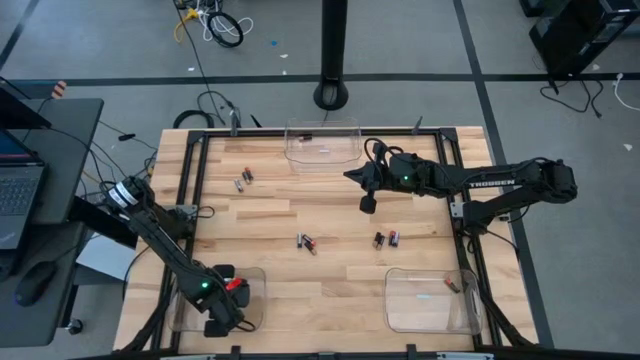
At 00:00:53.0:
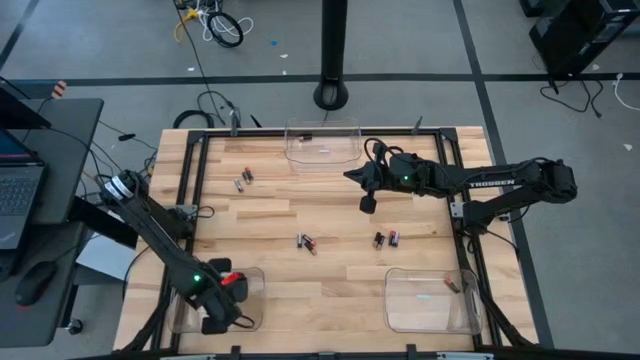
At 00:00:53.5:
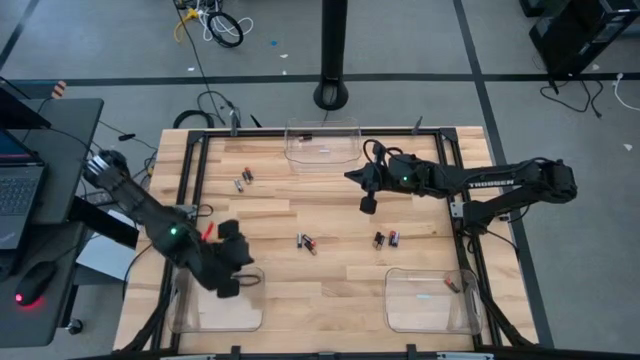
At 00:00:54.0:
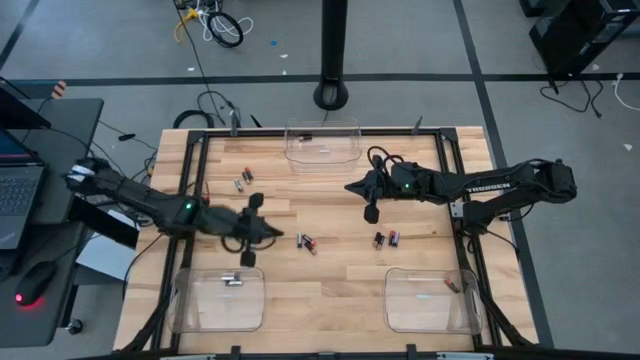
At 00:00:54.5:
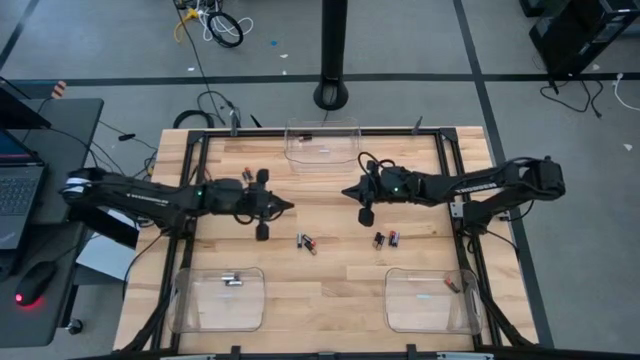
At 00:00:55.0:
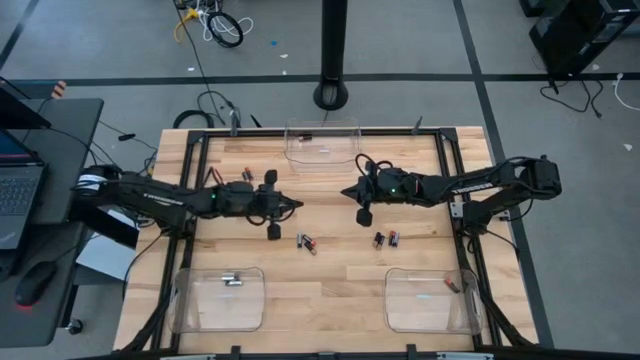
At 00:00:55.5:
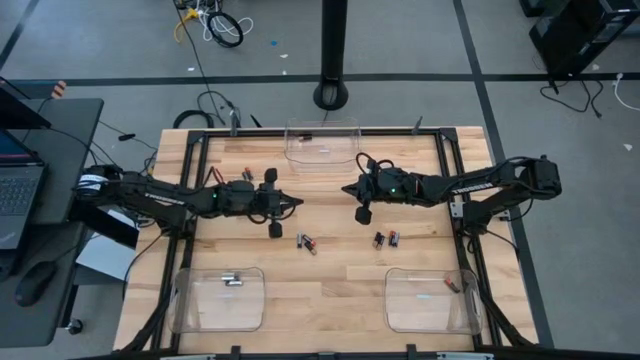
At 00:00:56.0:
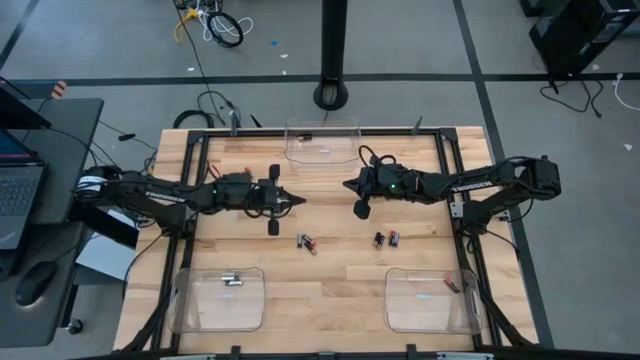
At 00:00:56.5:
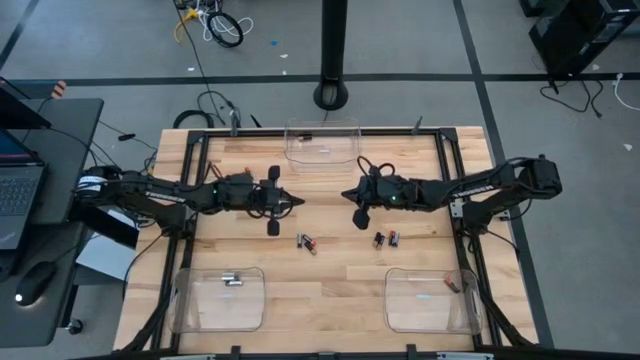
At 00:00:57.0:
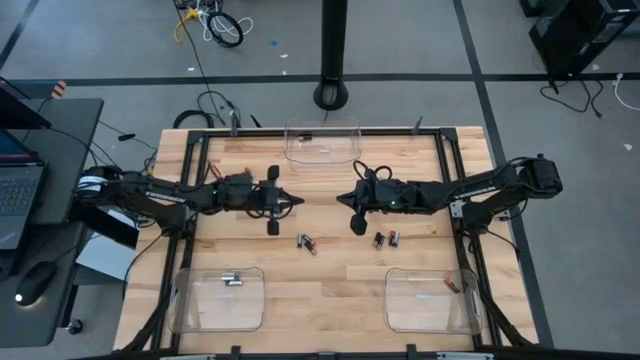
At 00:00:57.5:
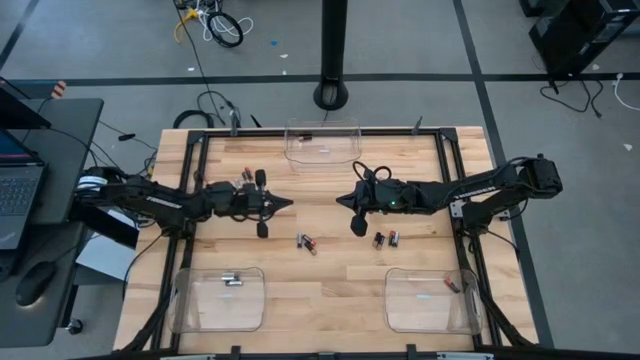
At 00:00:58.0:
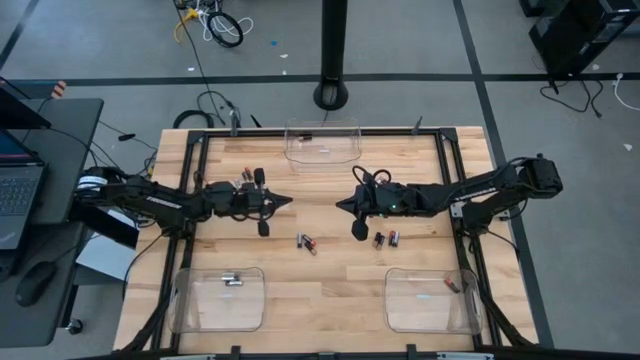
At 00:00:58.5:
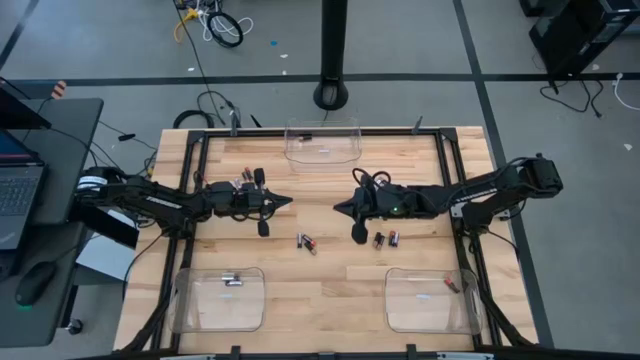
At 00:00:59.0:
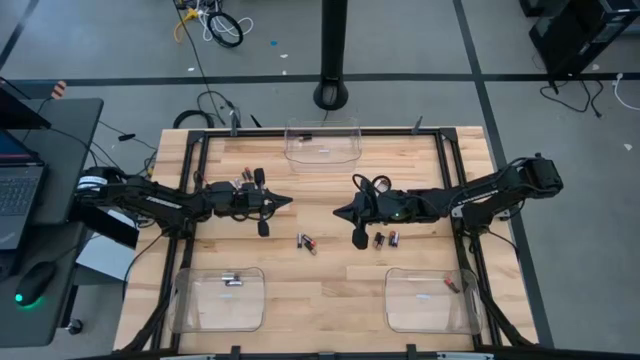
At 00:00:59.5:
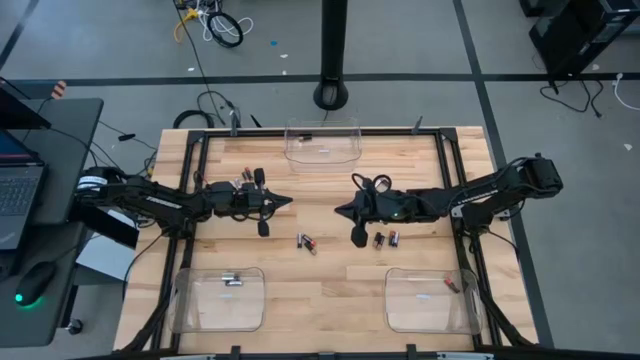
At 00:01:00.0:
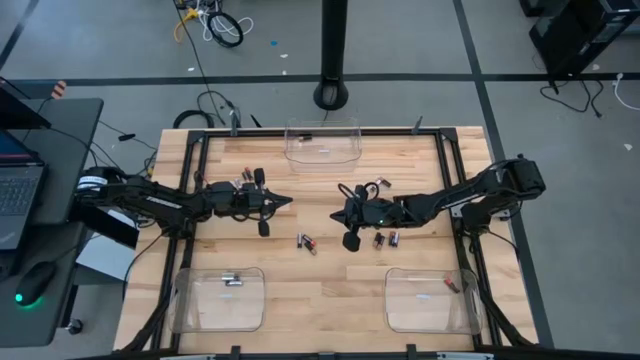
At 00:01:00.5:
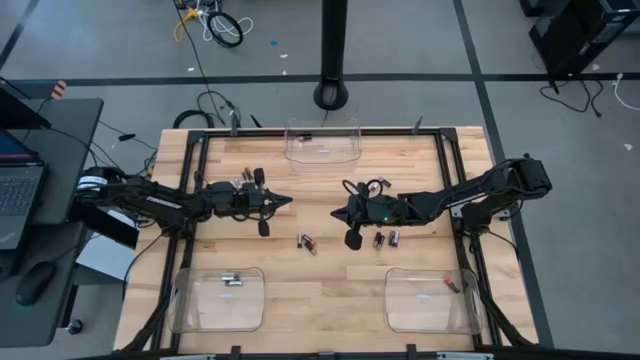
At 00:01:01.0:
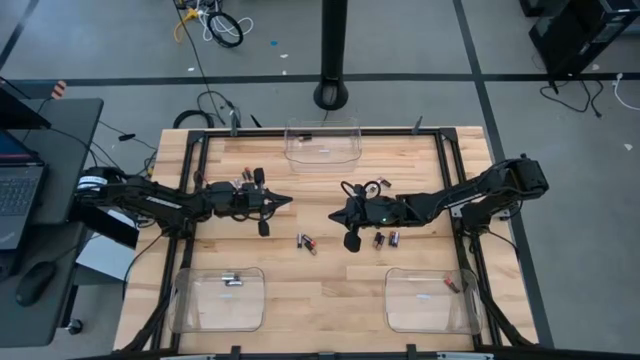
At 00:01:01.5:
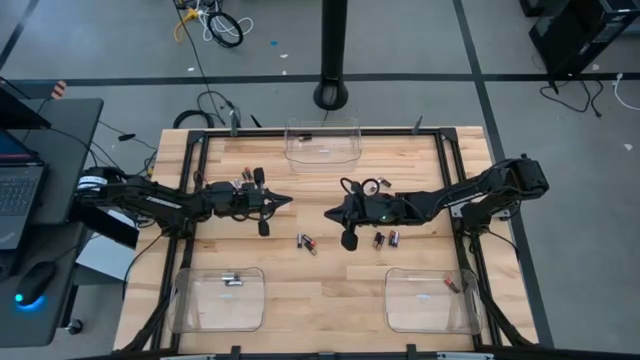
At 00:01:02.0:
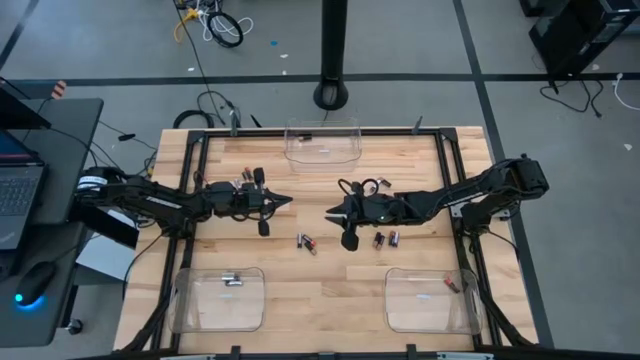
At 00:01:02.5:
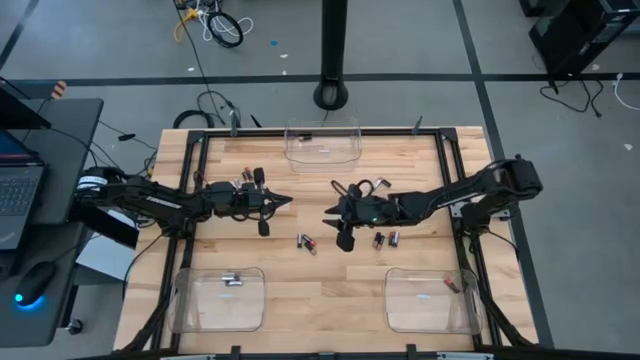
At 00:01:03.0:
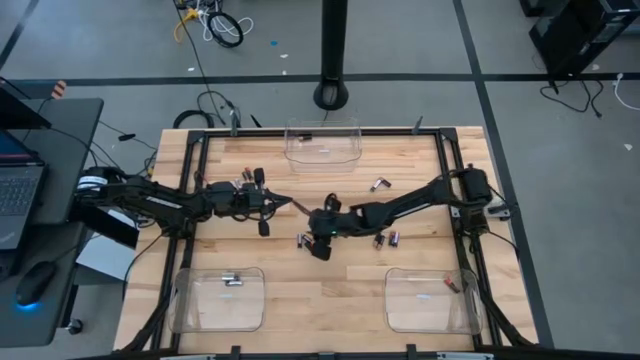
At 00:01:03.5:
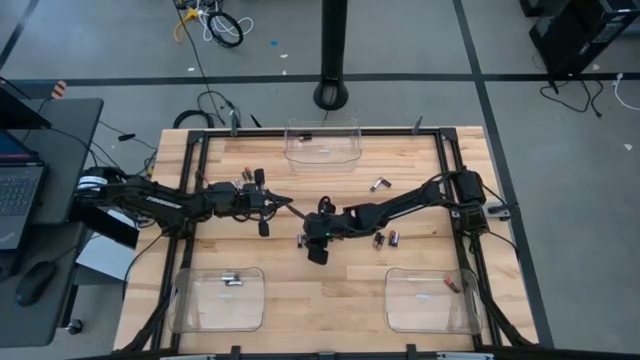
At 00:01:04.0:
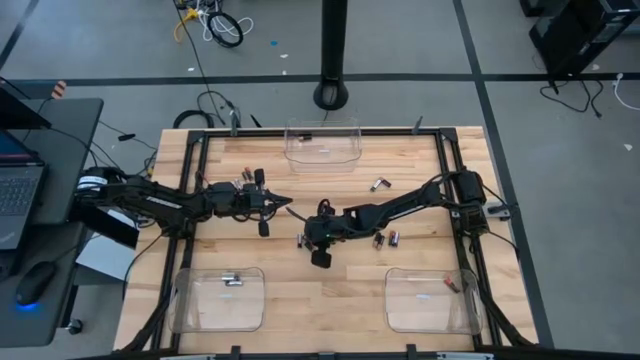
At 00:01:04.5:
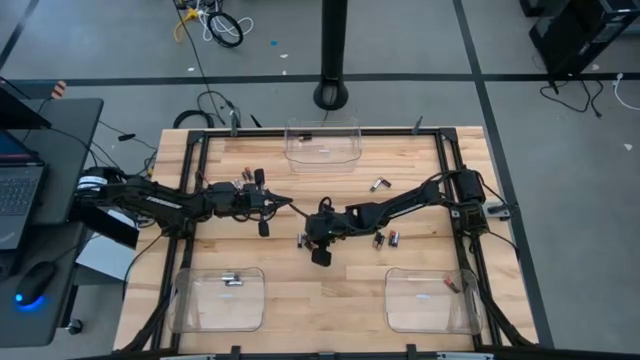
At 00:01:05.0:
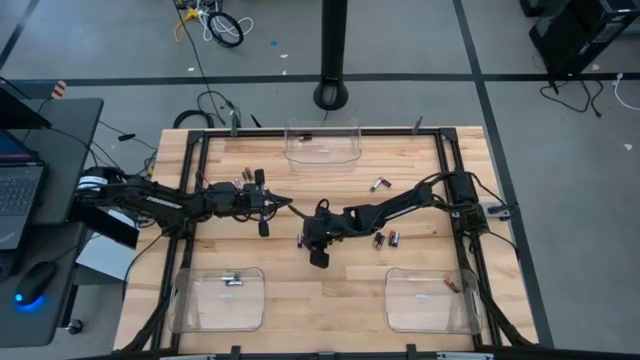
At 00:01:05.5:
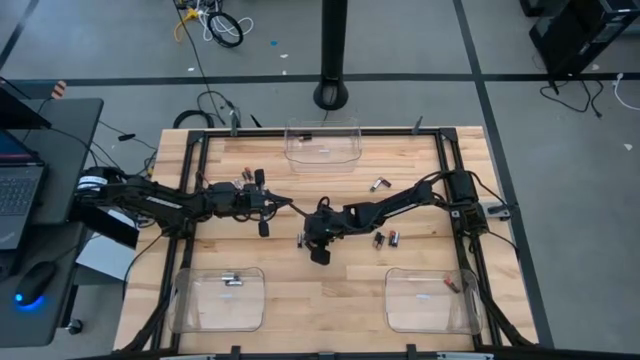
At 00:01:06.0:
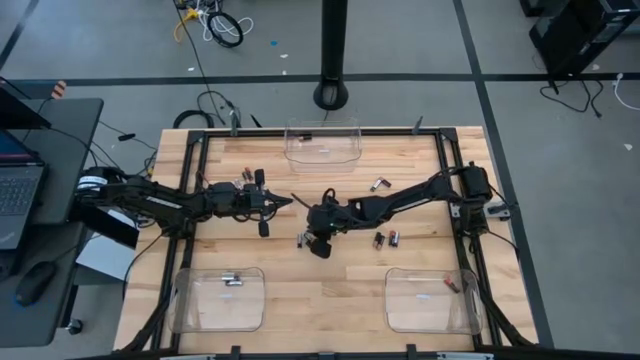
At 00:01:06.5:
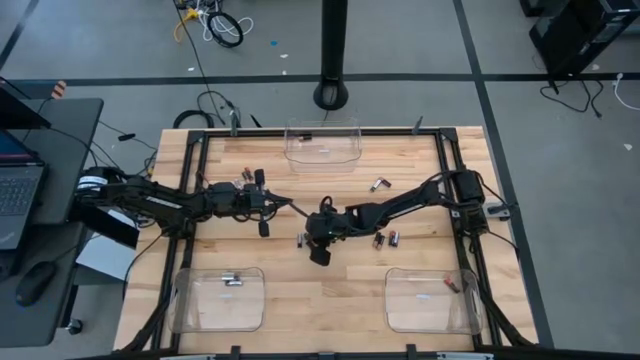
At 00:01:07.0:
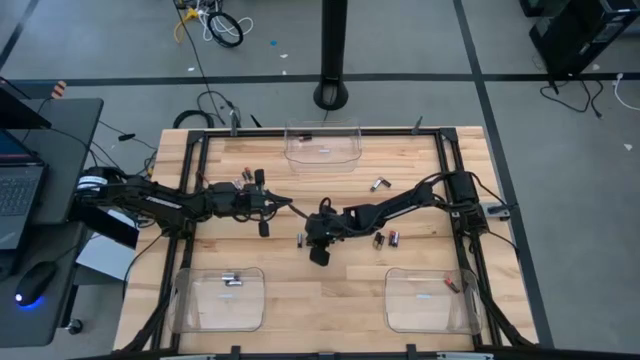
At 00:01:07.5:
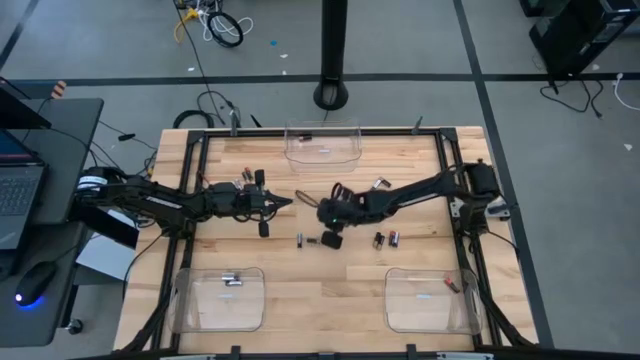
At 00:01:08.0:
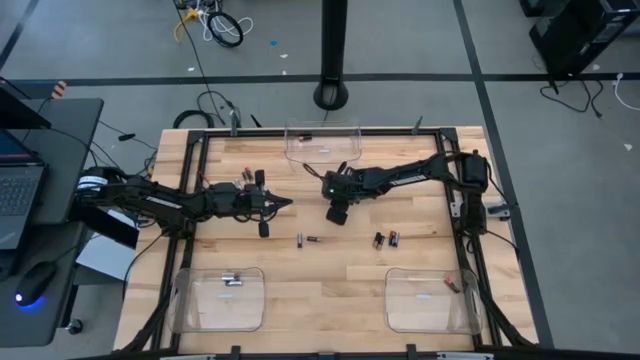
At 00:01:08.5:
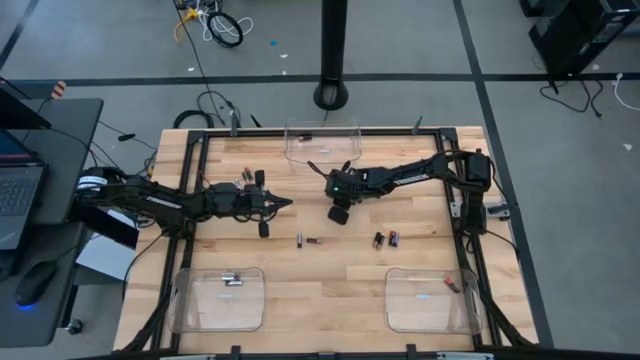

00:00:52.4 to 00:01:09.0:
Task: Sort batteries
Put the red battery into the bottom right transparent bin

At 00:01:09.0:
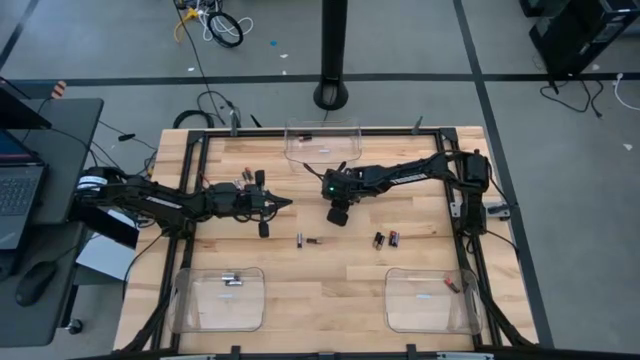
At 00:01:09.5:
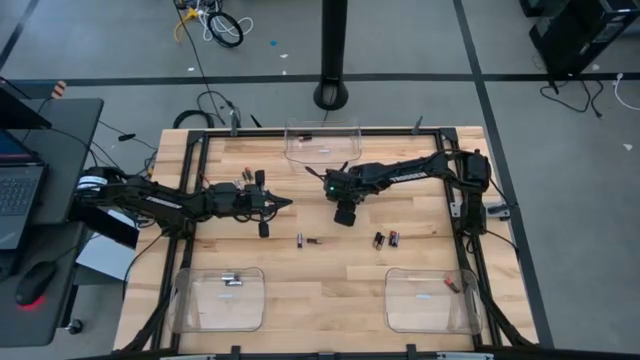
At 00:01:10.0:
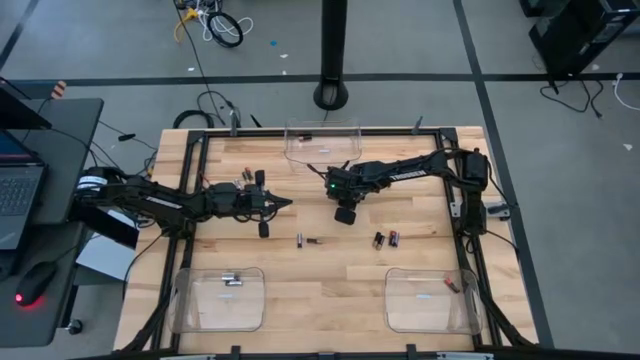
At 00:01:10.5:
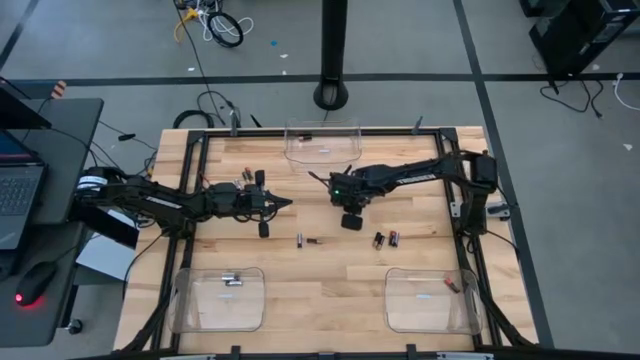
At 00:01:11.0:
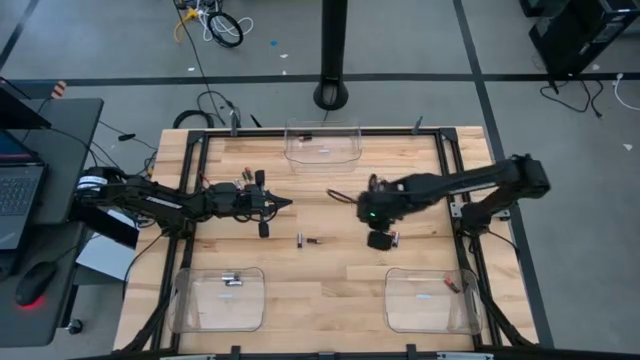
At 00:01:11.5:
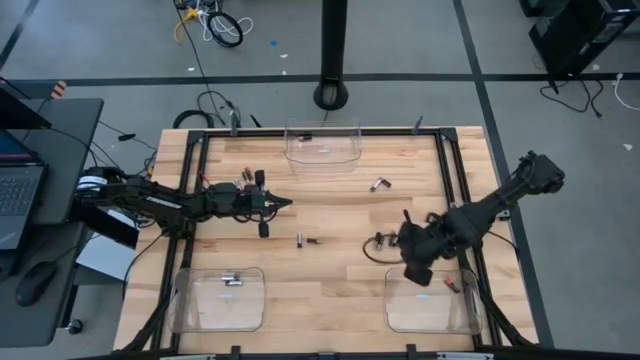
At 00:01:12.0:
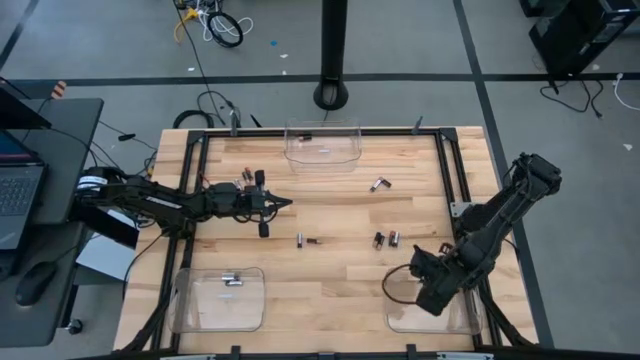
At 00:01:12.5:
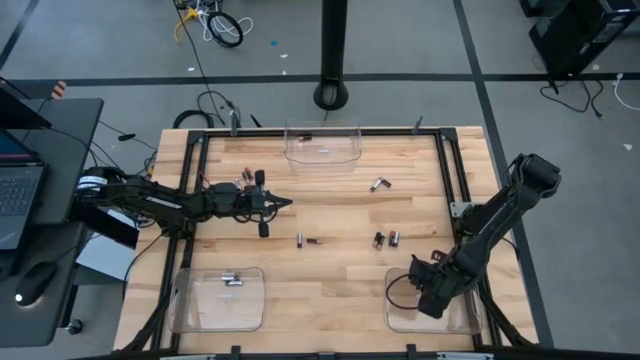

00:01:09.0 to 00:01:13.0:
Put the red battery into the bottom right transparent bin
